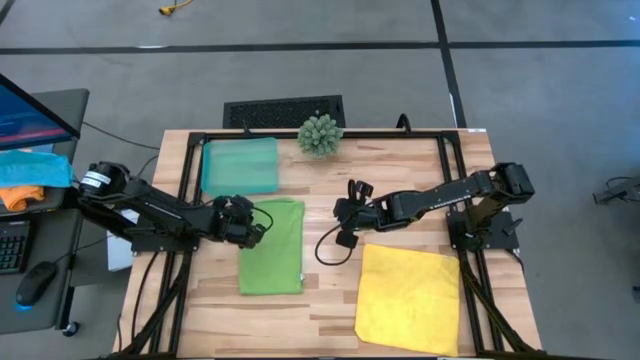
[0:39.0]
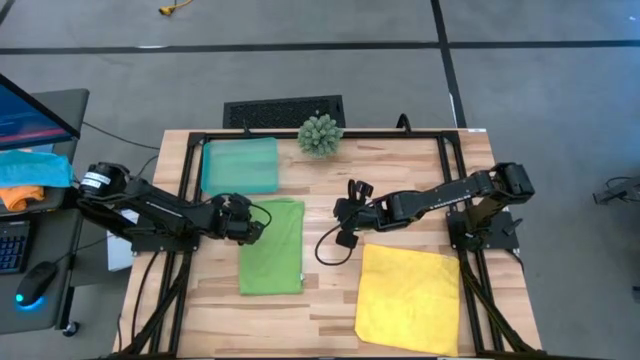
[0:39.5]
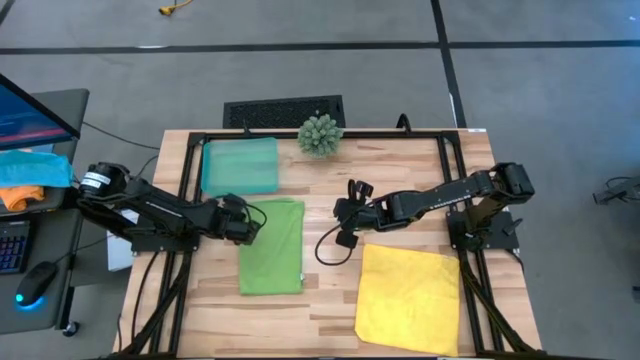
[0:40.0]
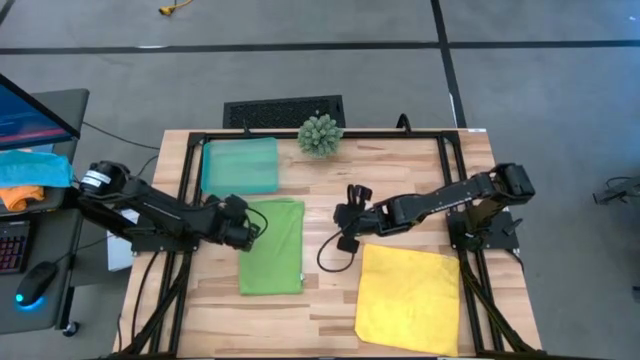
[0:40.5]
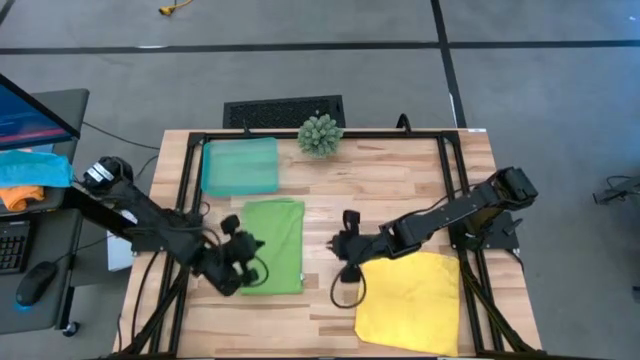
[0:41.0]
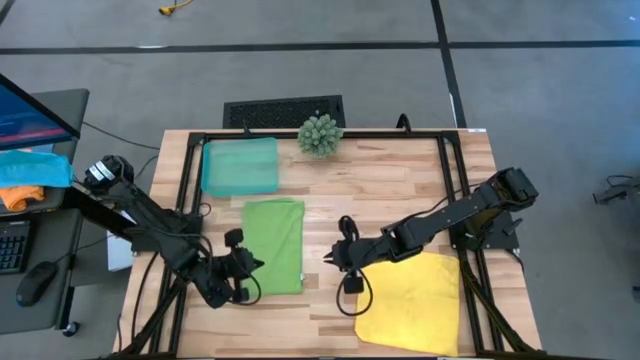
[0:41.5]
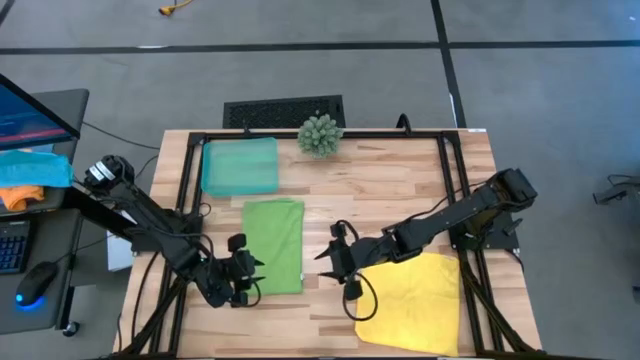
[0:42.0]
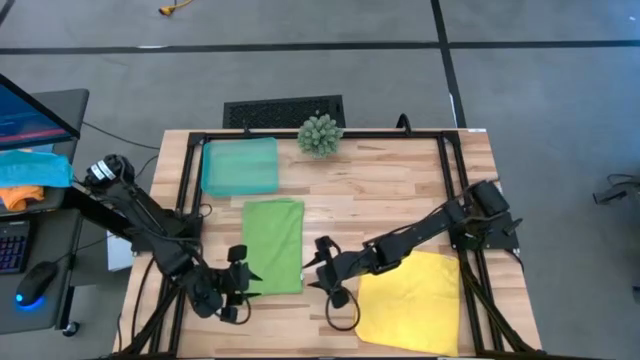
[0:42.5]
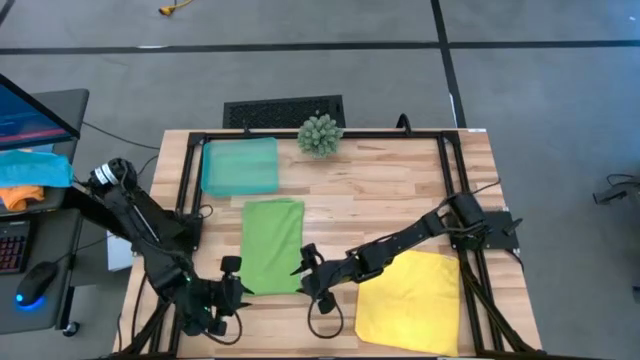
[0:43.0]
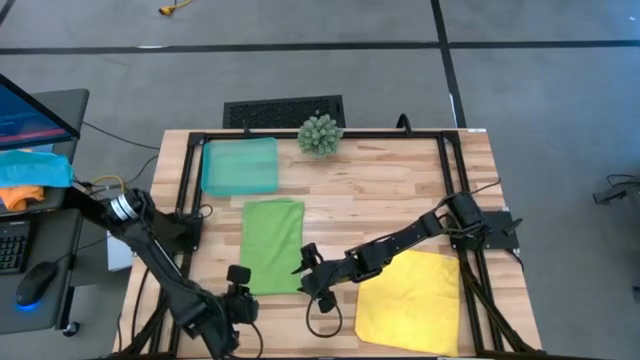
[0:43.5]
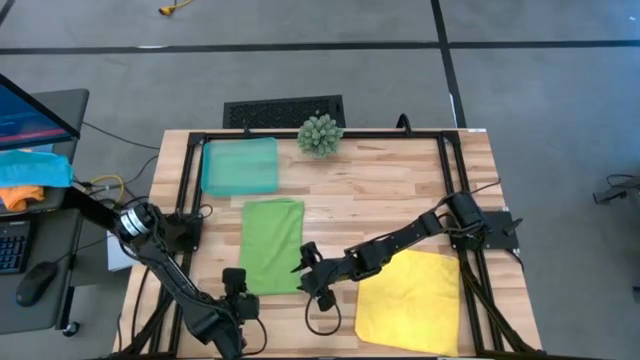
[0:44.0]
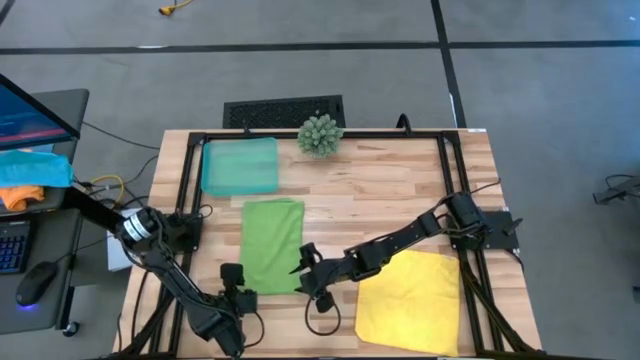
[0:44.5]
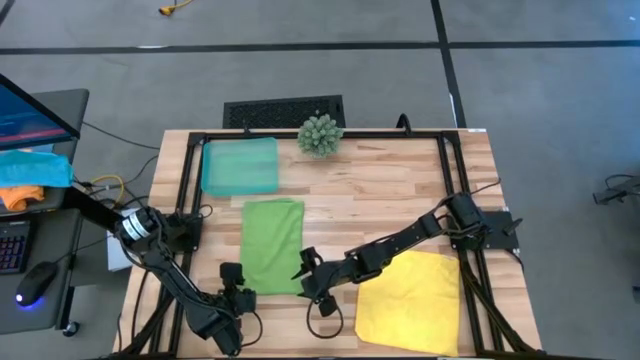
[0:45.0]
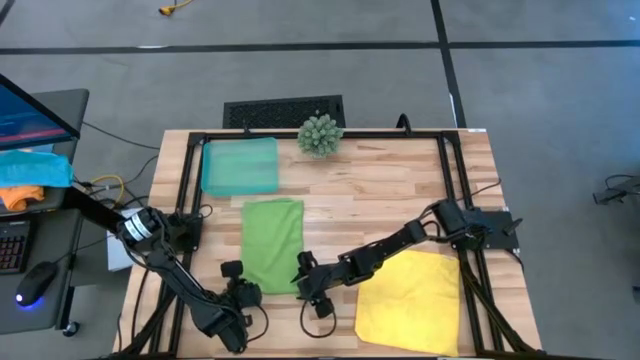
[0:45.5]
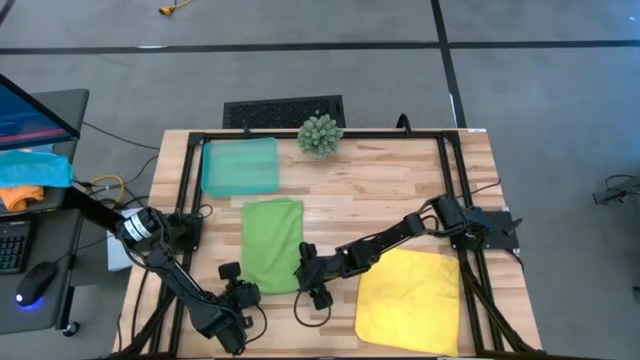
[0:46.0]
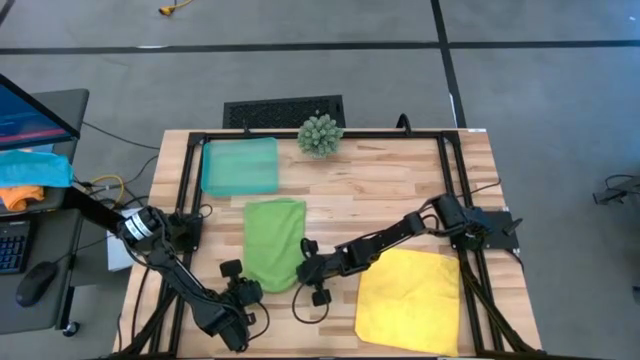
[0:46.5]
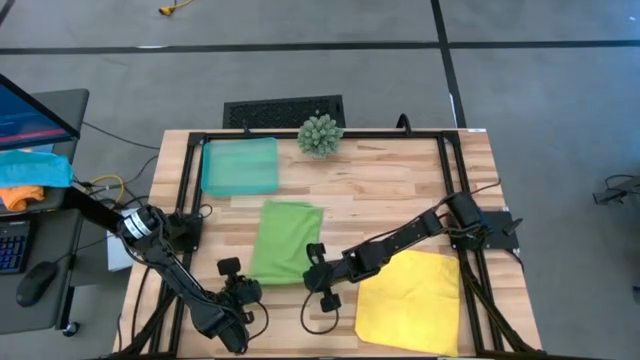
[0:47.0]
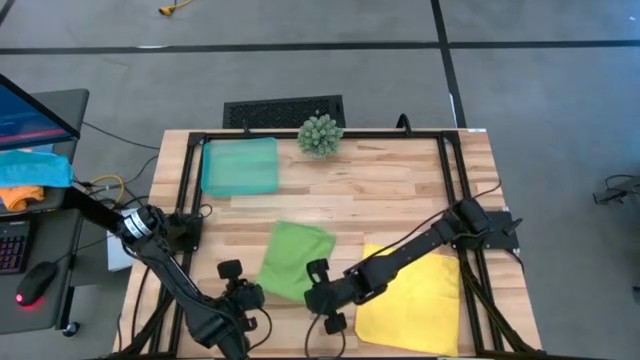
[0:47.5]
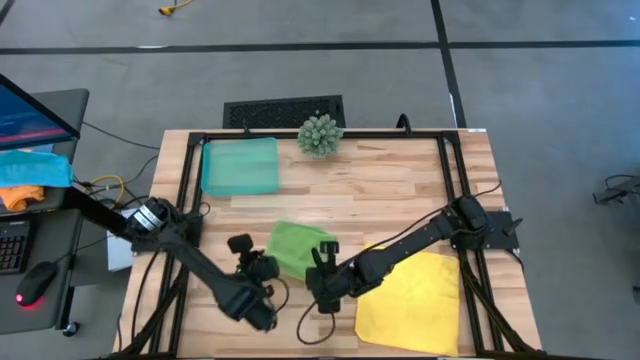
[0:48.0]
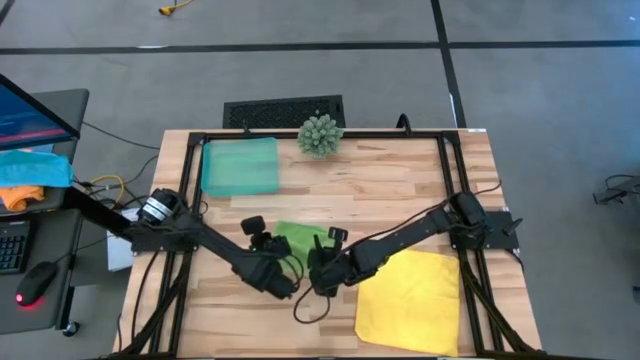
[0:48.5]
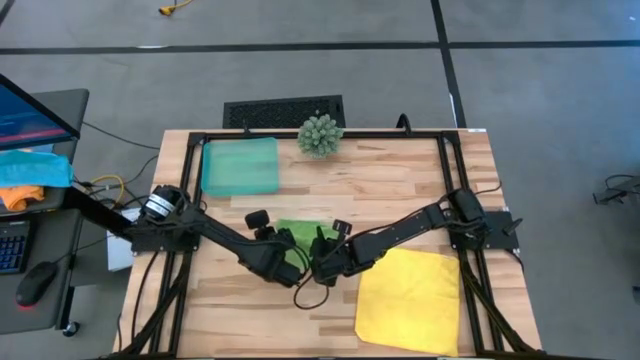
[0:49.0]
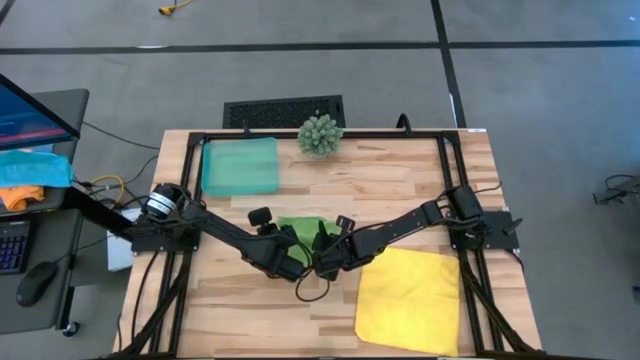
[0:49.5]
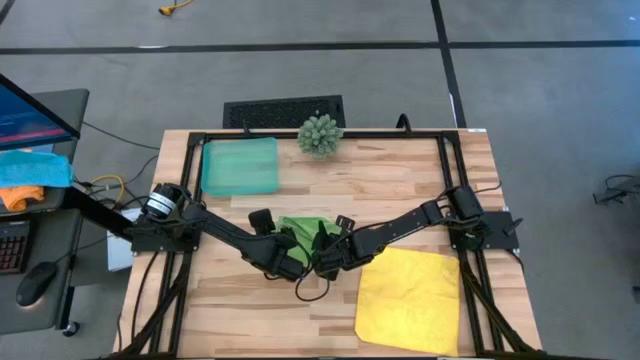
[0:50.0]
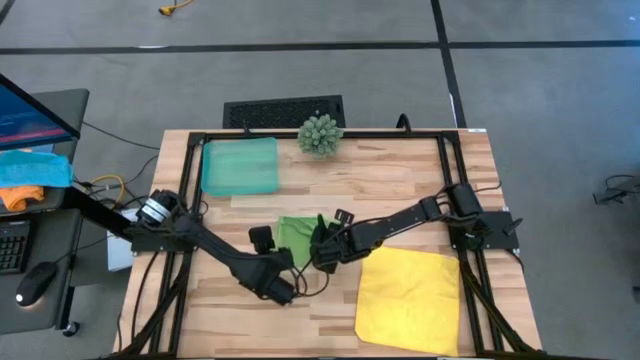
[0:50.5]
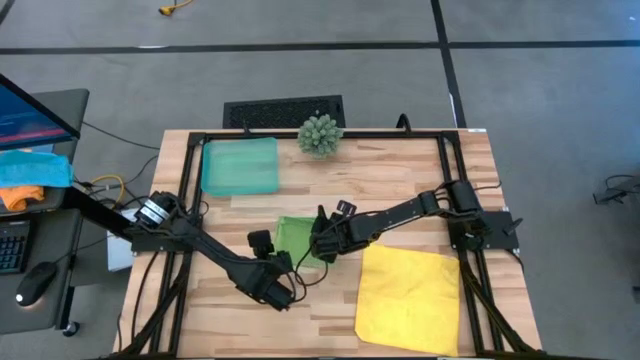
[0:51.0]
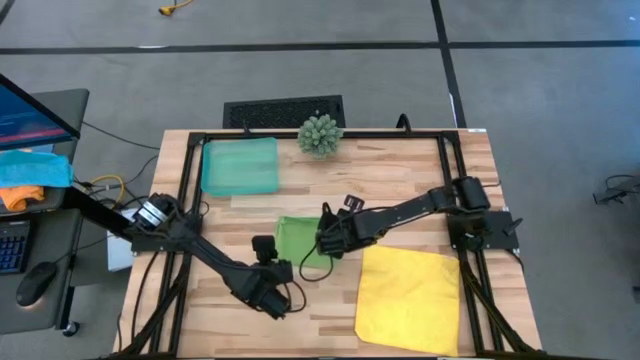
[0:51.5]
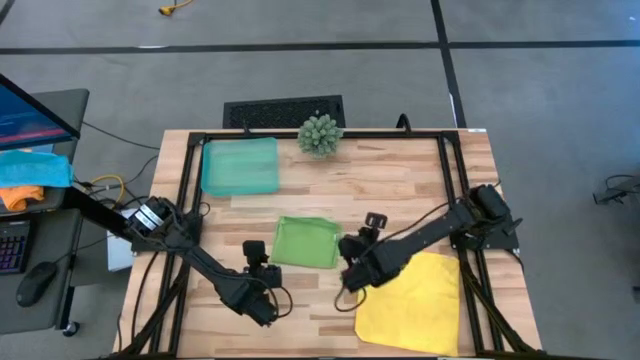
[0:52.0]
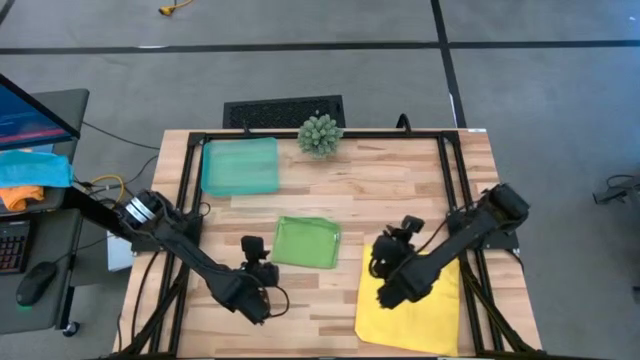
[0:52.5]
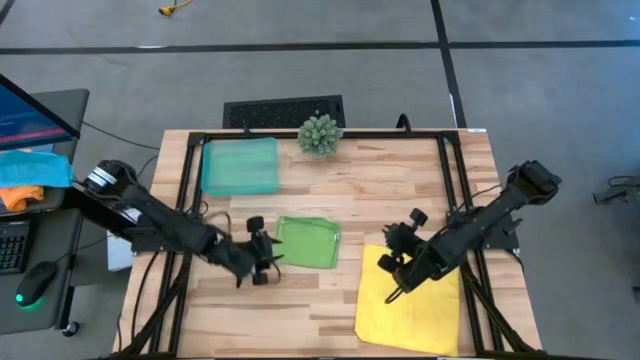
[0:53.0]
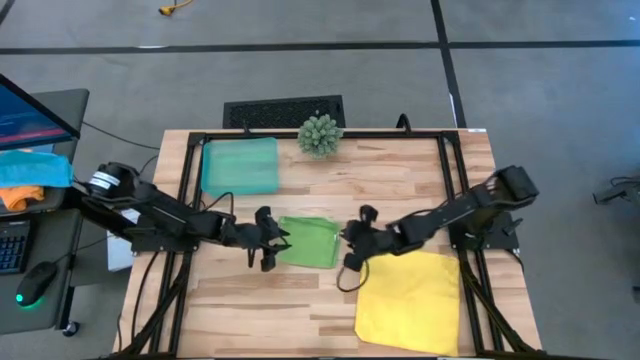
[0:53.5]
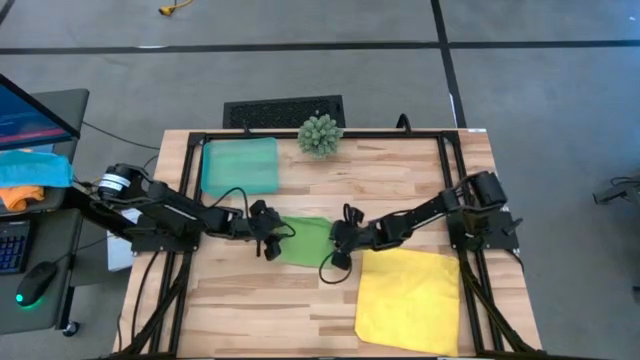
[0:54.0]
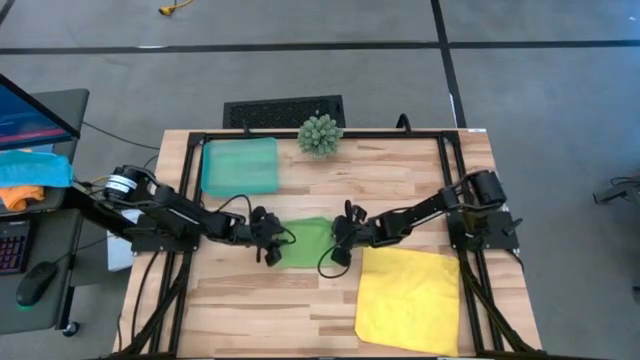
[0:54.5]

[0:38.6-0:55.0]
Task: Roll microfiber towels into tight, uniform cylinder then place into a basket
Fold the green towel

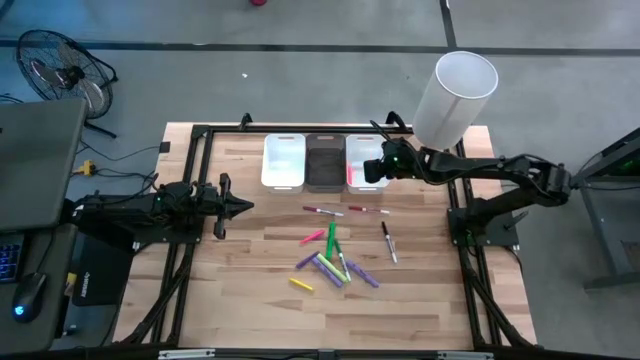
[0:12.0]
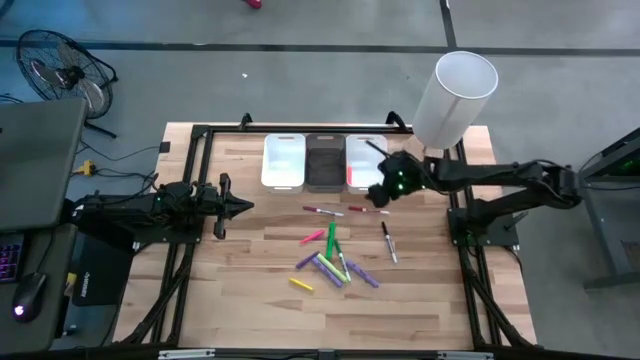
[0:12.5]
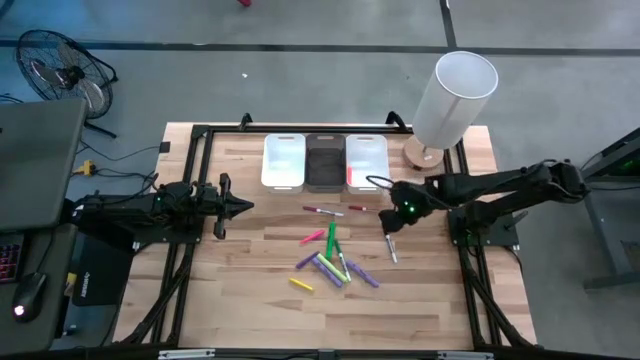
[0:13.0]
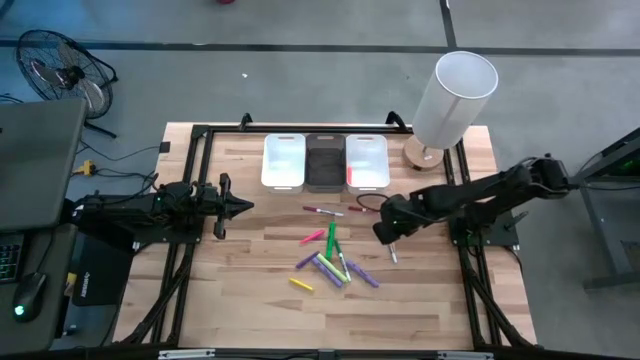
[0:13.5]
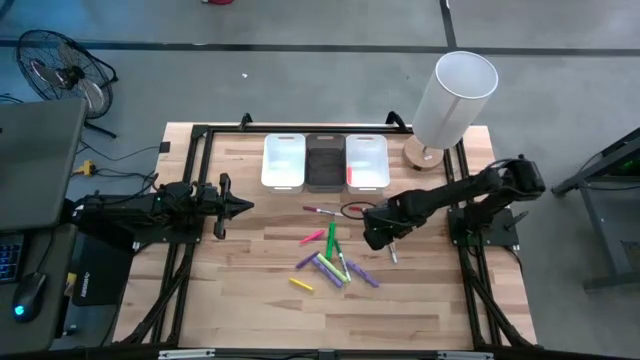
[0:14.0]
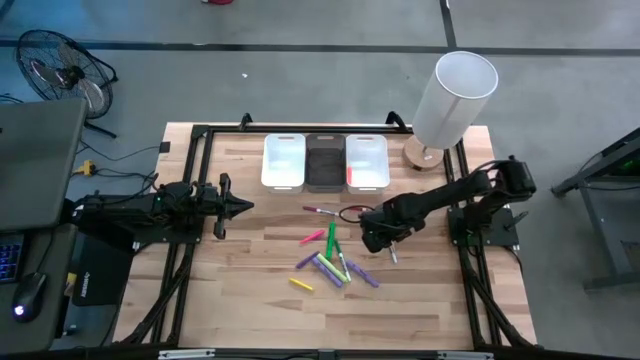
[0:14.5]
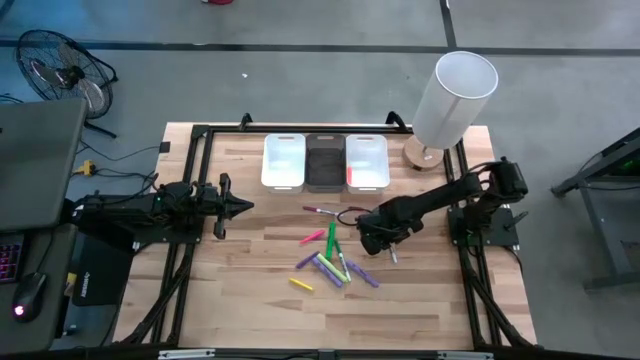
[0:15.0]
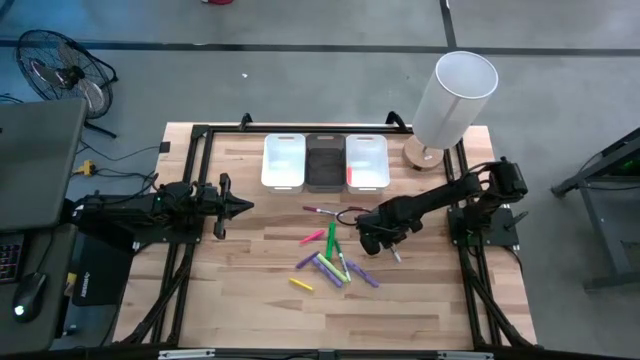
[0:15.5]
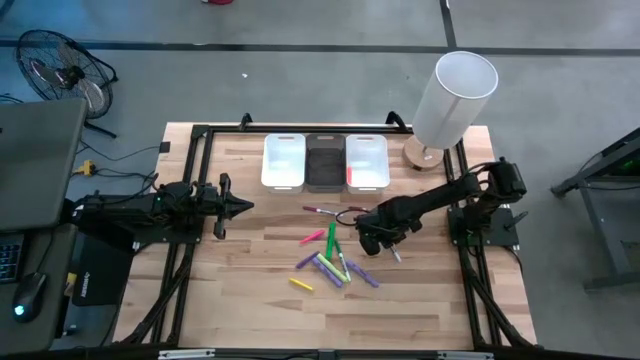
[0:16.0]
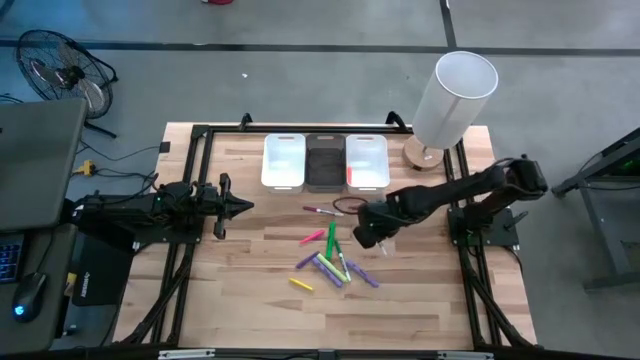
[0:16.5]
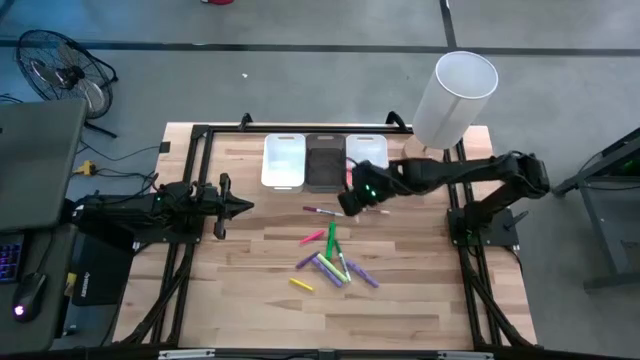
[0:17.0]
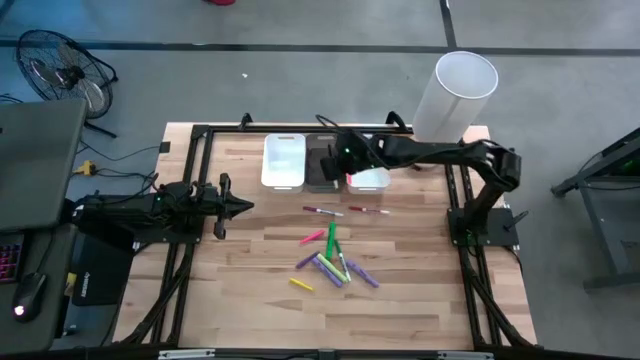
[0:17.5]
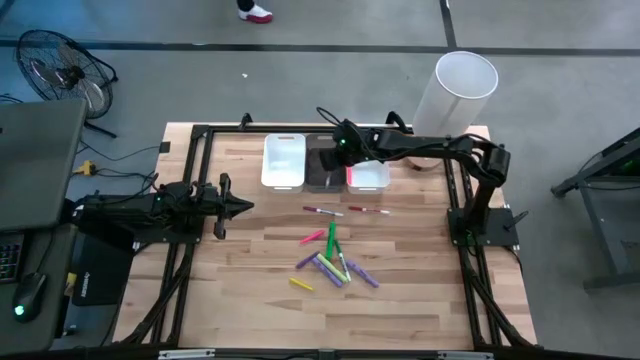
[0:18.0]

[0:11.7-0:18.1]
Task: Pick & Place Markers
Put the black marker pen into the black bin
